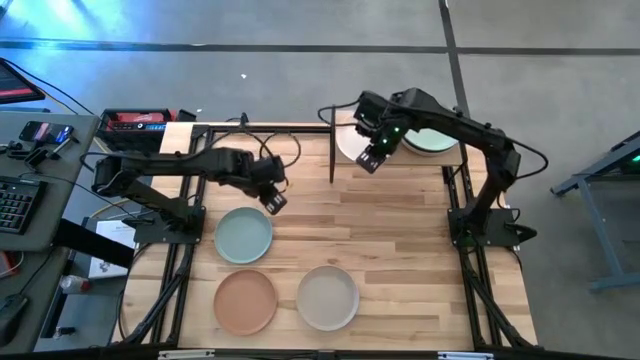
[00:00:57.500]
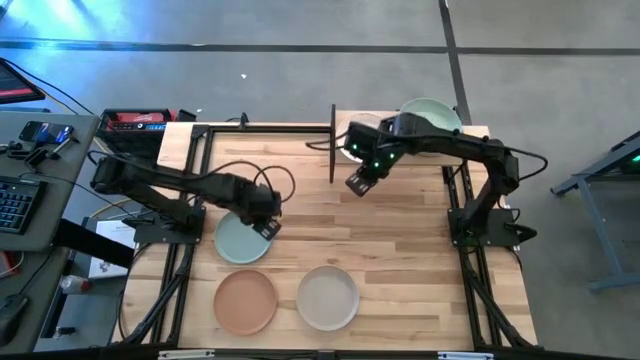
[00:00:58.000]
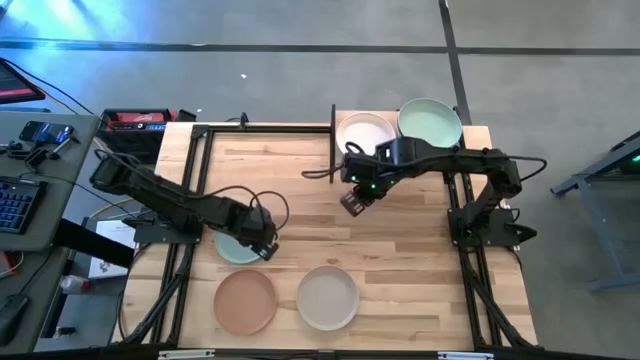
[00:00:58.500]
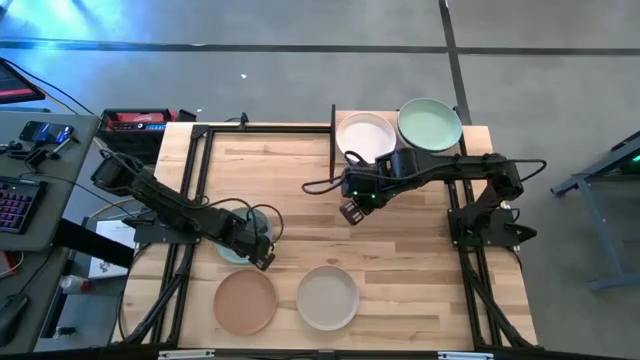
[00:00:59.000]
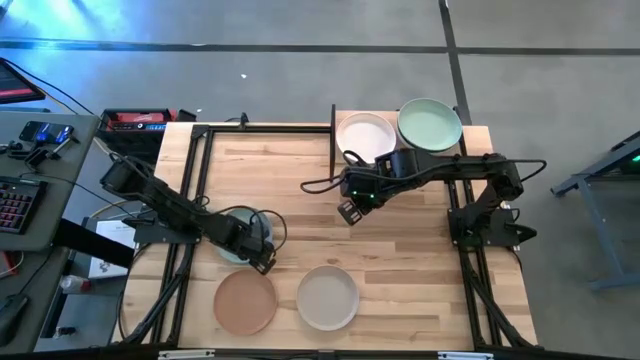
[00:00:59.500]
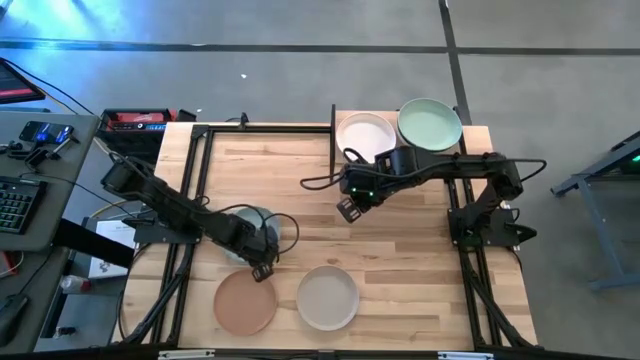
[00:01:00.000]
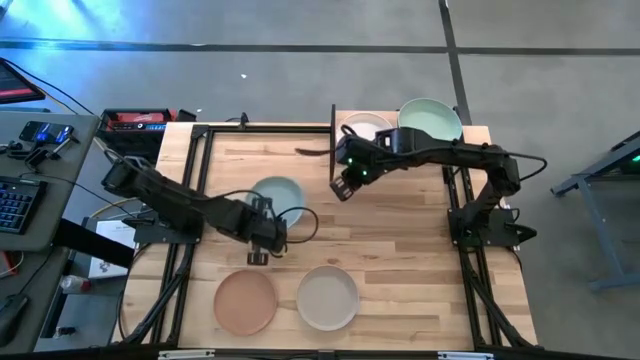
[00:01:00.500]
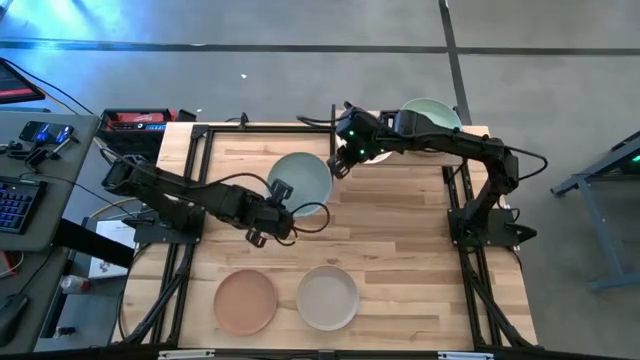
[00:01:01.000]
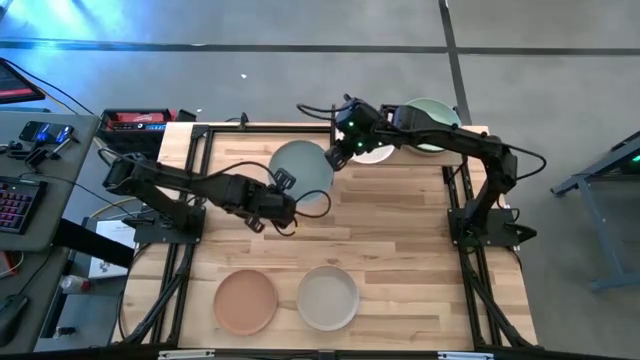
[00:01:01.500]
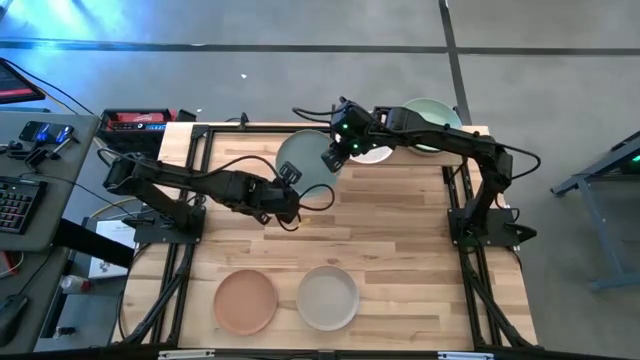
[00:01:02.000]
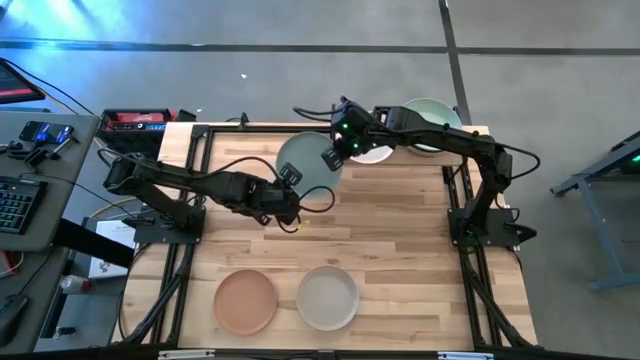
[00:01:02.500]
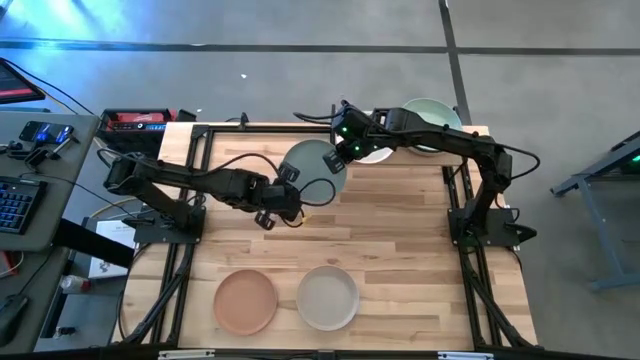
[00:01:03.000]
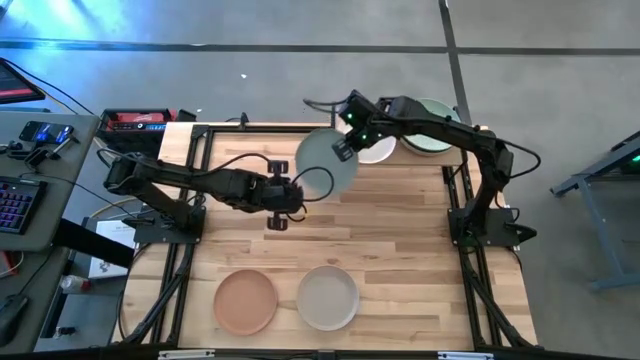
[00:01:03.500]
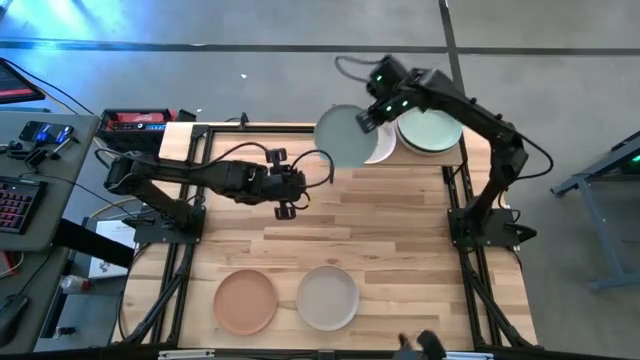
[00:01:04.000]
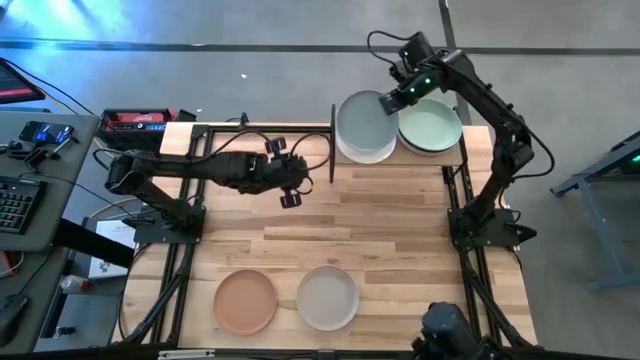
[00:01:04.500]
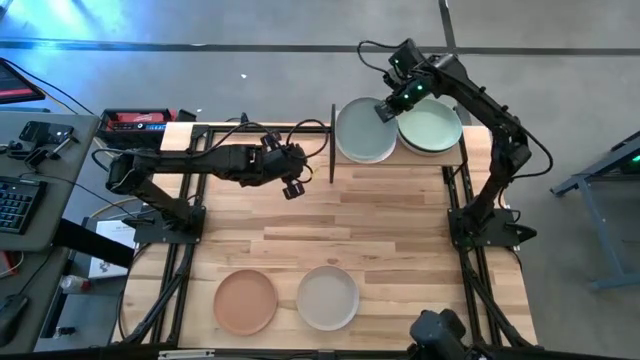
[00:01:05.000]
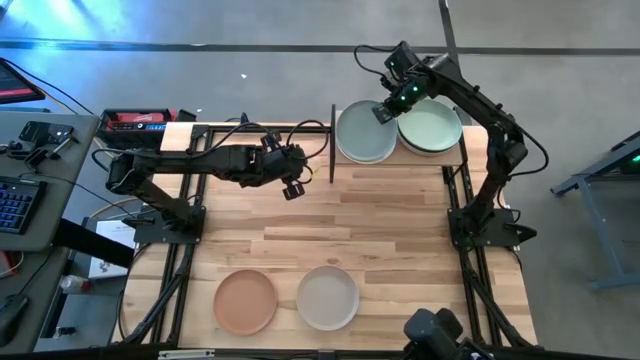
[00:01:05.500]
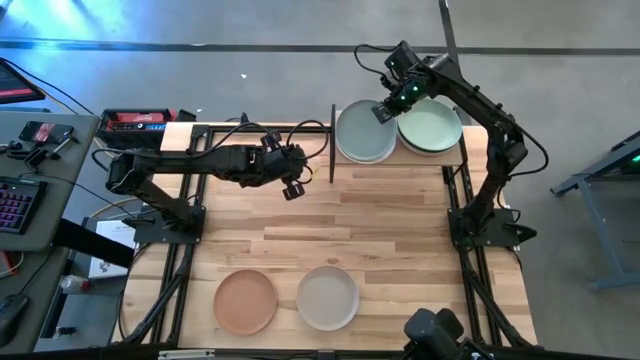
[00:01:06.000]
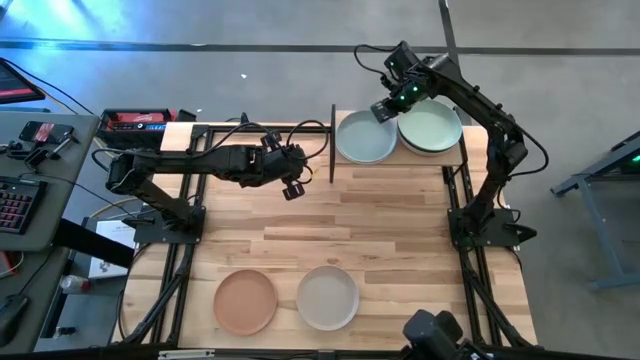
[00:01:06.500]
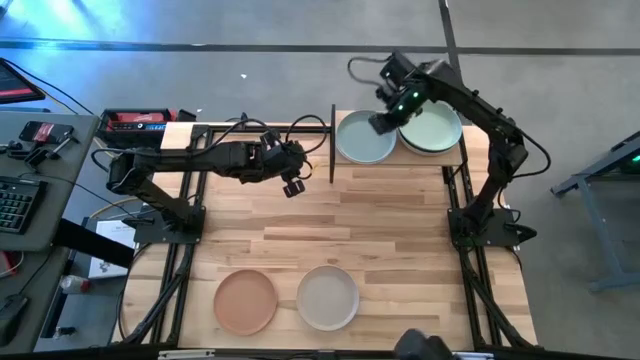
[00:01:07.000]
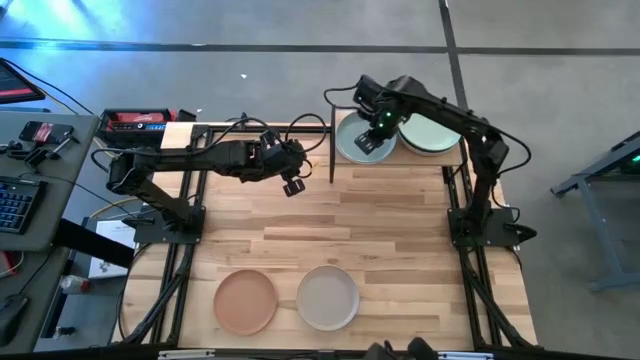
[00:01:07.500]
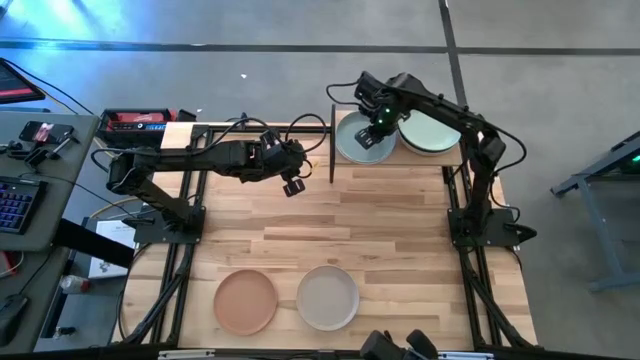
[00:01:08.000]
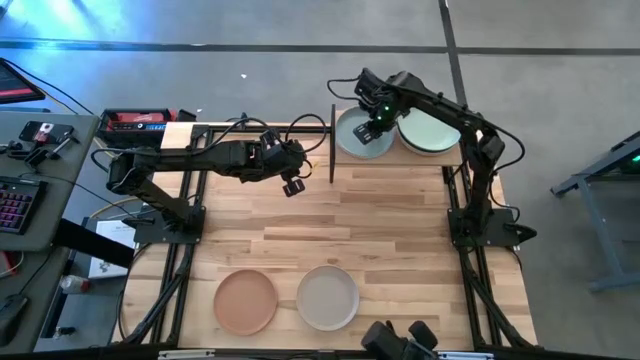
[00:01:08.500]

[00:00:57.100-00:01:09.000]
Task: Place and stack plates onto a shelf
Stack the blue plate on top of the white plate on the shelf

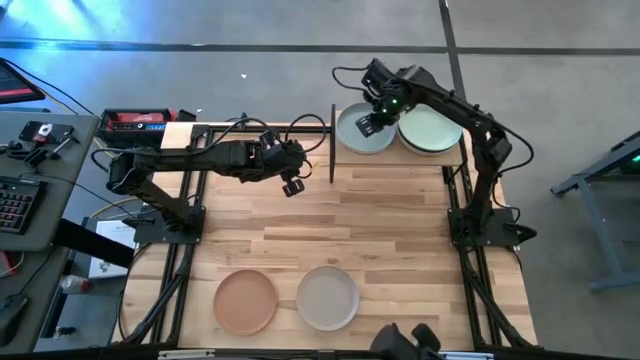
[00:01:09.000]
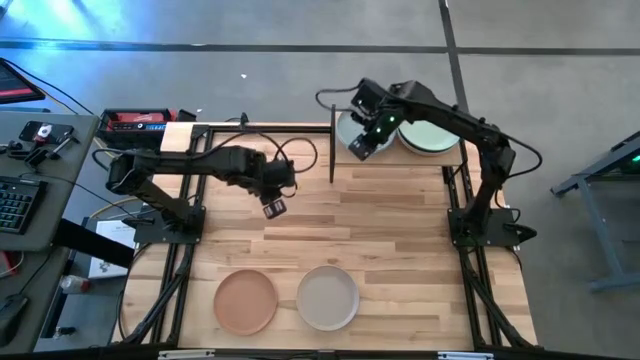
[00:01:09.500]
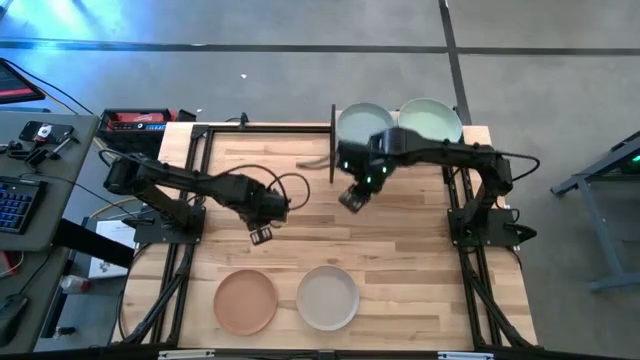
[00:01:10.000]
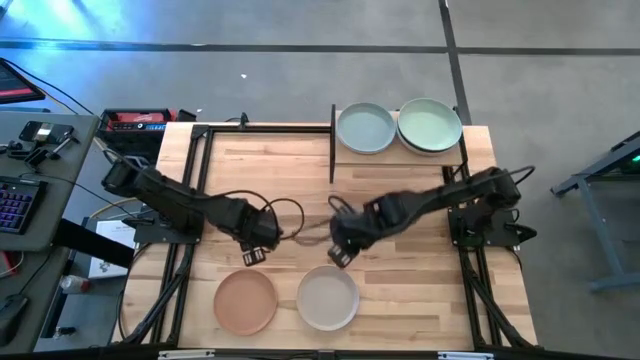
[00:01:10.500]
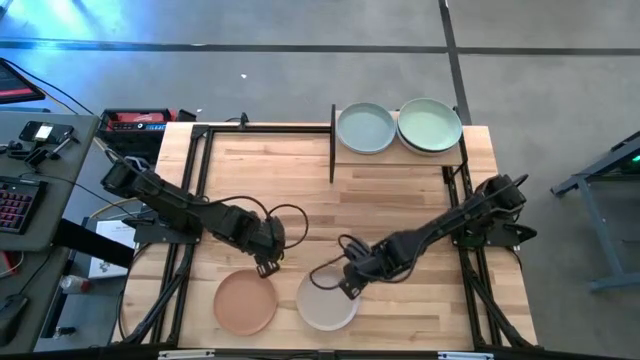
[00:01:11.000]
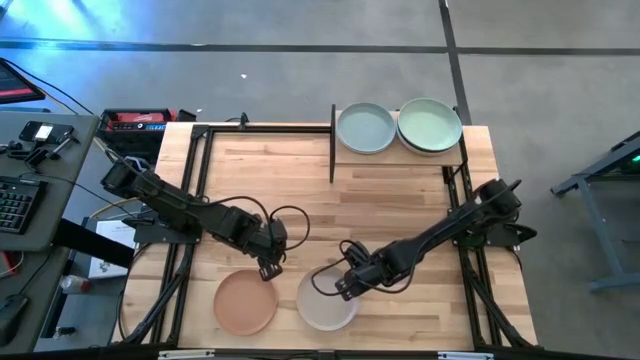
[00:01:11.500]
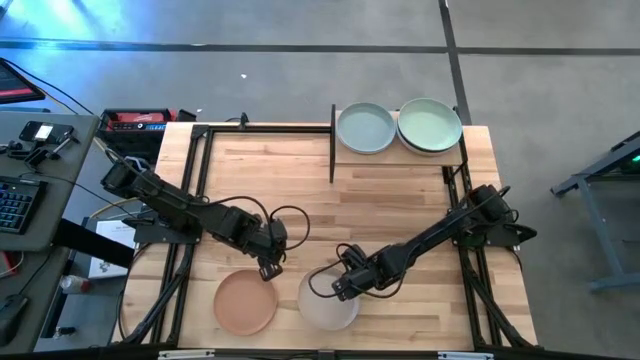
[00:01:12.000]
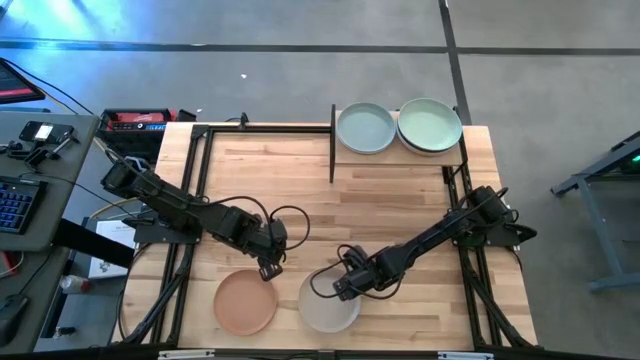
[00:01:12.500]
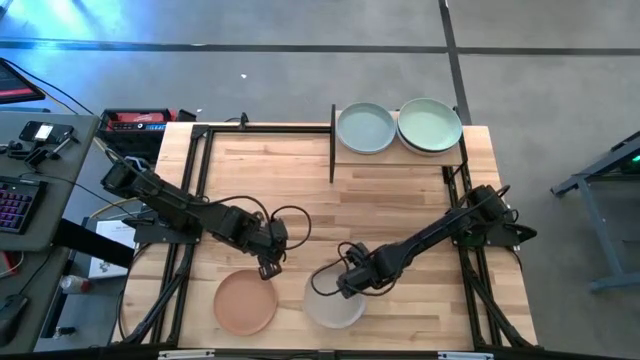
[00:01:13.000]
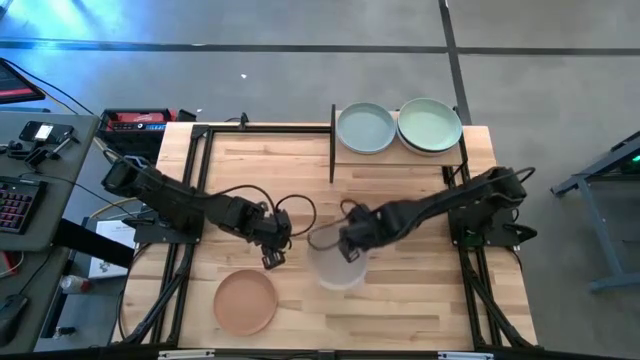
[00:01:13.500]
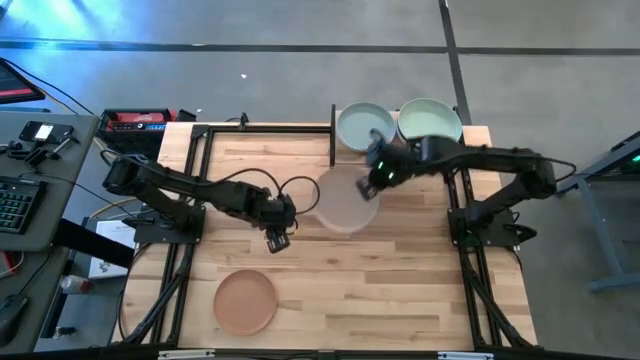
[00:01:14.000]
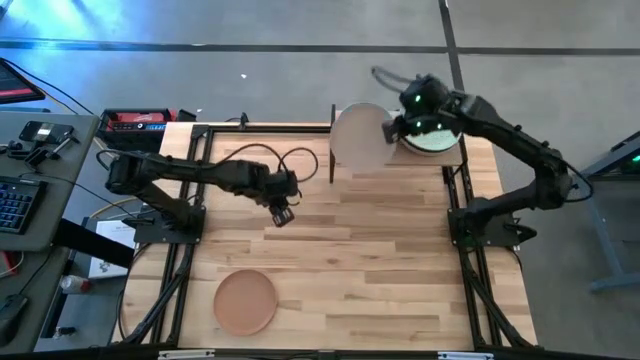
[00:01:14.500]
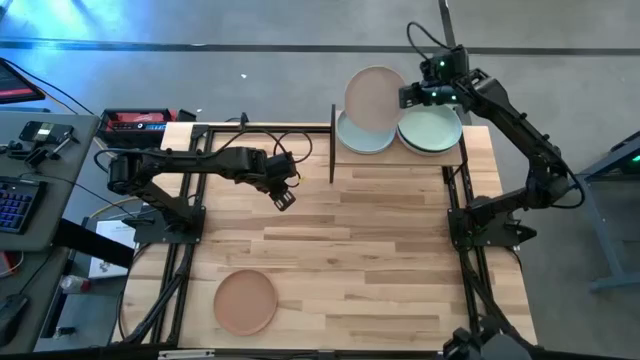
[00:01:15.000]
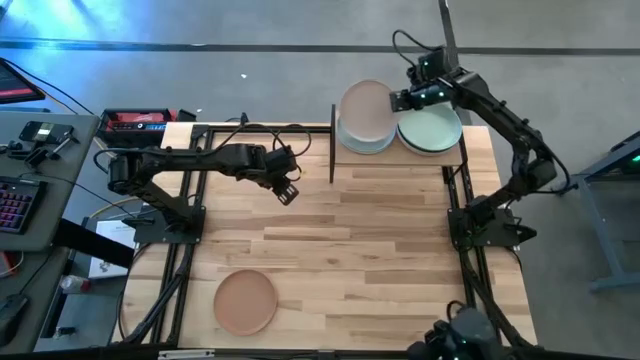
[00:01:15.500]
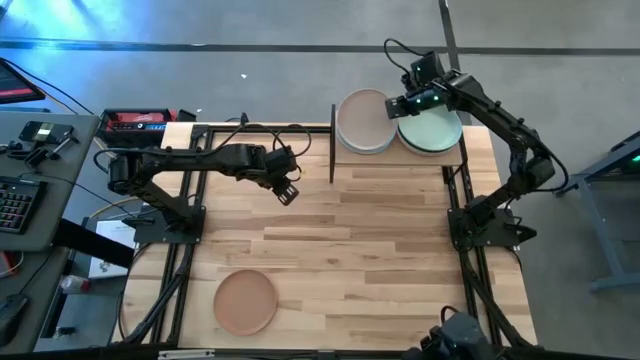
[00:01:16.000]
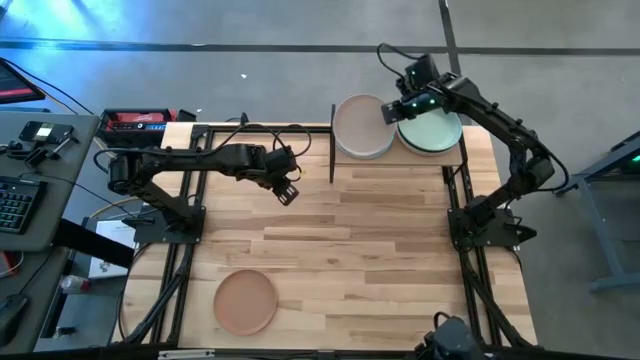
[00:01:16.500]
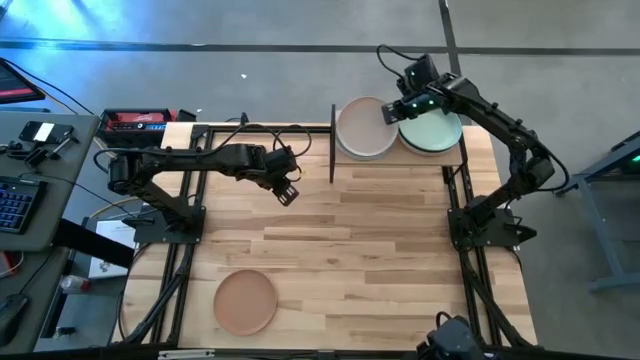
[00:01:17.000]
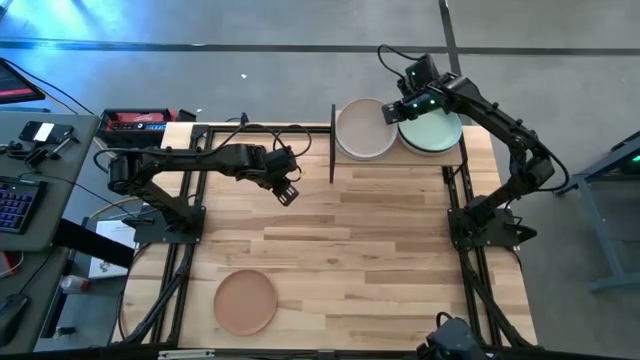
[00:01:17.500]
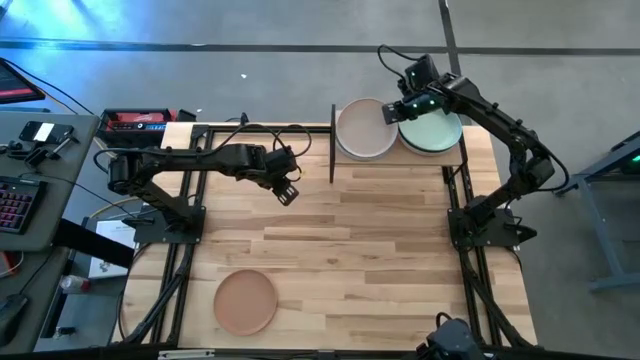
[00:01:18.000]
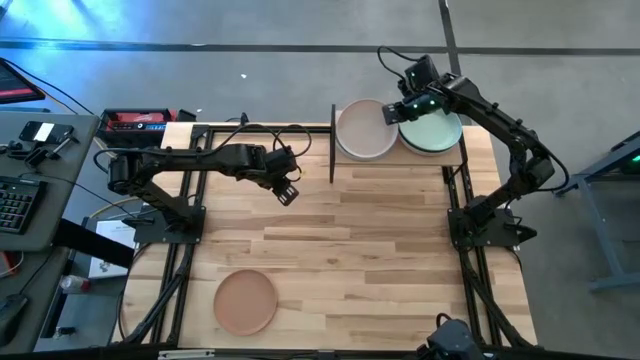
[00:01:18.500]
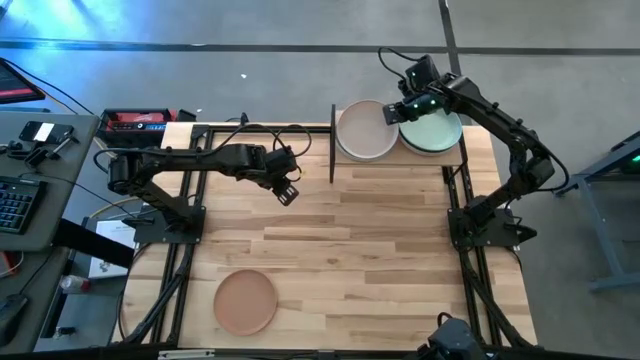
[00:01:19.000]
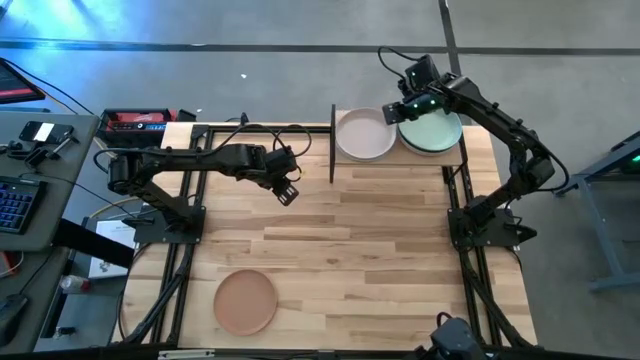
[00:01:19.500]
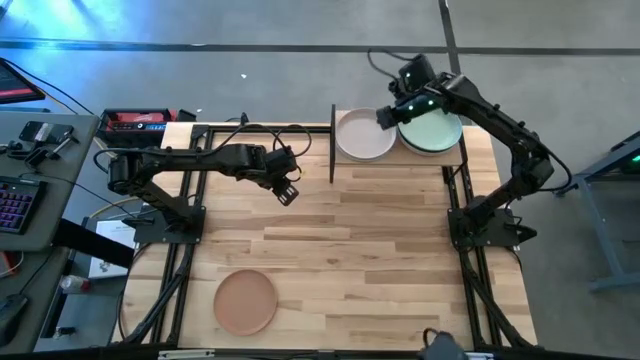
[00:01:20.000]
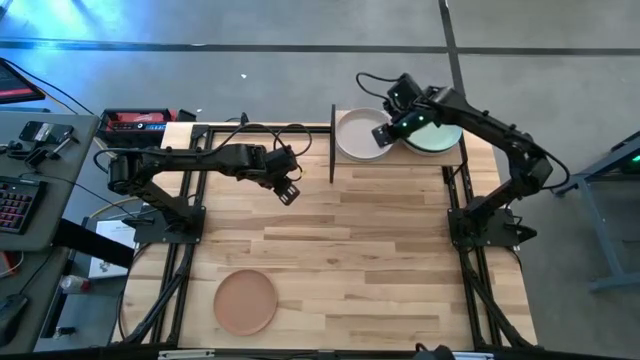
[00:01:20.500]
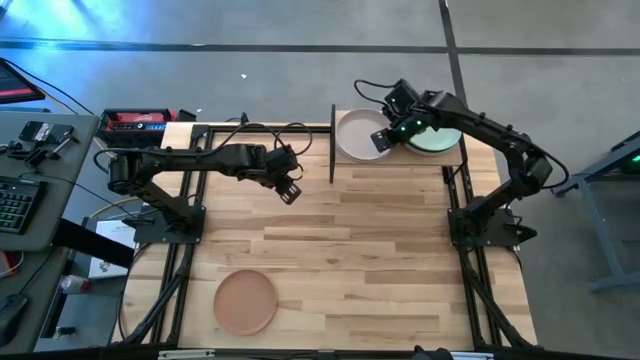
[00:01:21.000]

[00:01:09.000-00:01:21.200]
Stack the light brown plate on top of the blue plate on the shelf
